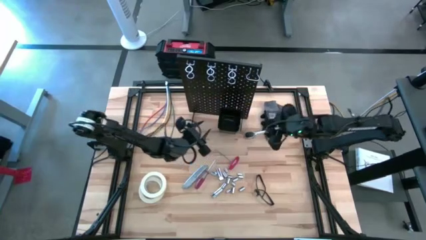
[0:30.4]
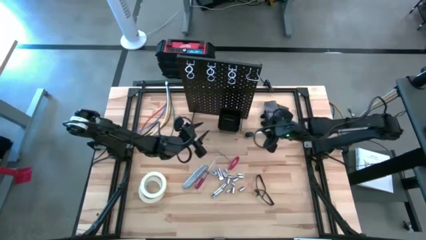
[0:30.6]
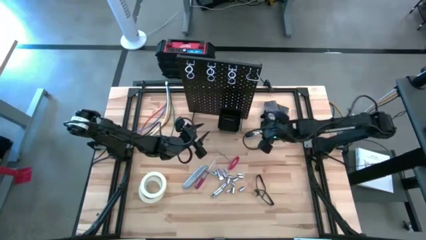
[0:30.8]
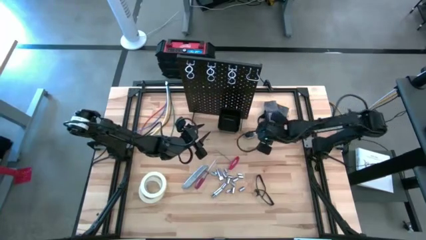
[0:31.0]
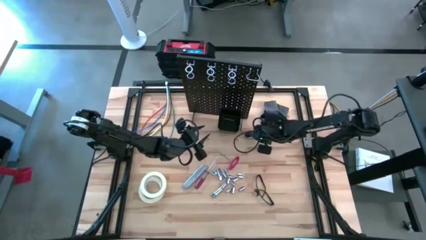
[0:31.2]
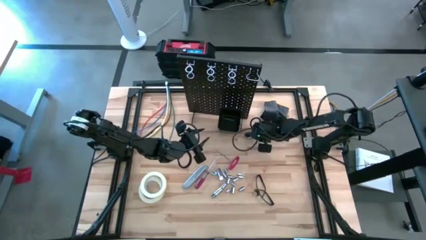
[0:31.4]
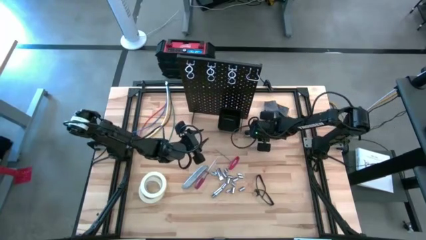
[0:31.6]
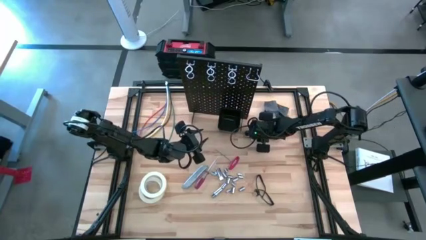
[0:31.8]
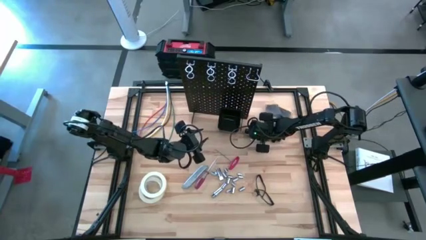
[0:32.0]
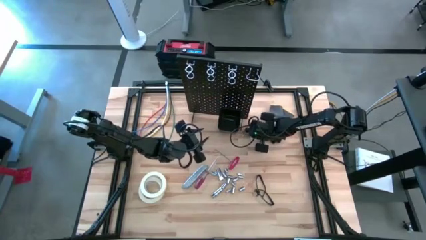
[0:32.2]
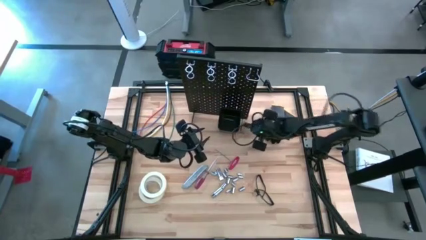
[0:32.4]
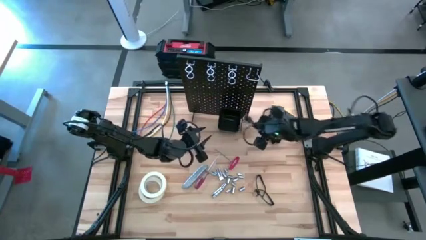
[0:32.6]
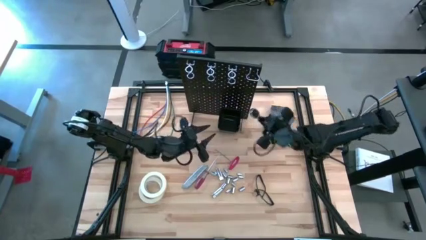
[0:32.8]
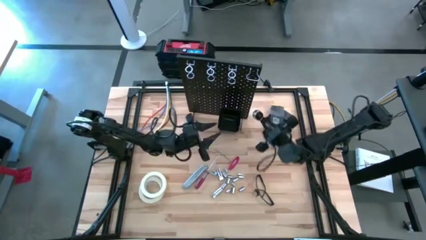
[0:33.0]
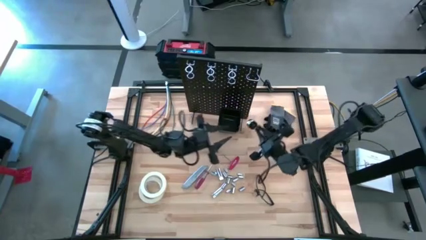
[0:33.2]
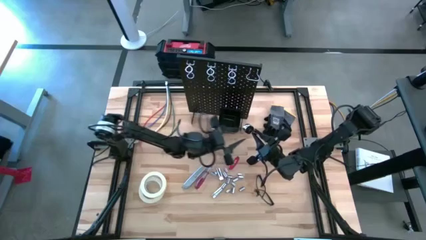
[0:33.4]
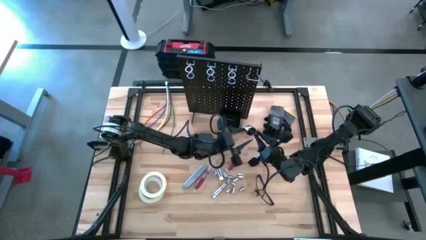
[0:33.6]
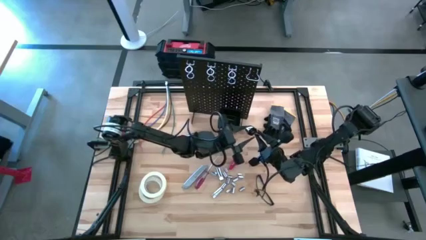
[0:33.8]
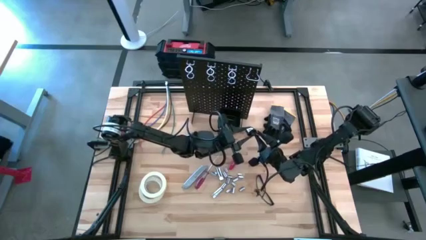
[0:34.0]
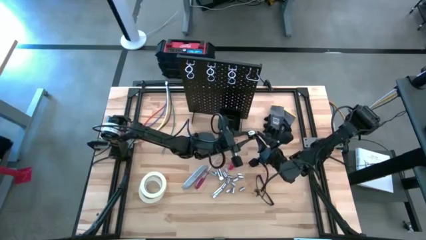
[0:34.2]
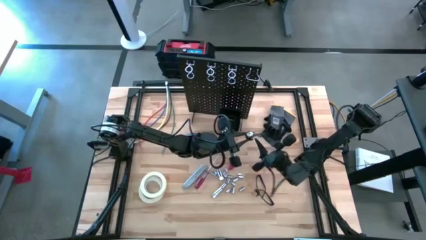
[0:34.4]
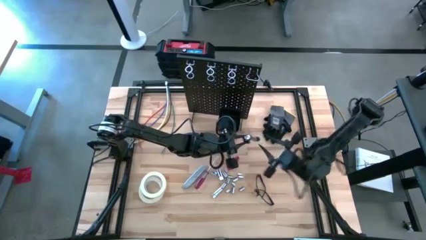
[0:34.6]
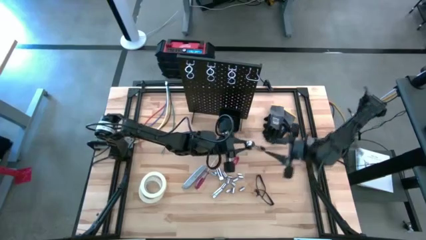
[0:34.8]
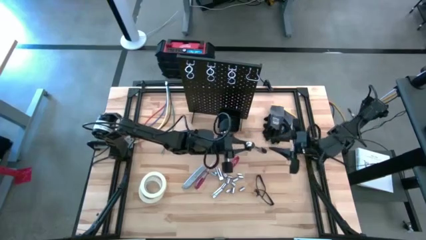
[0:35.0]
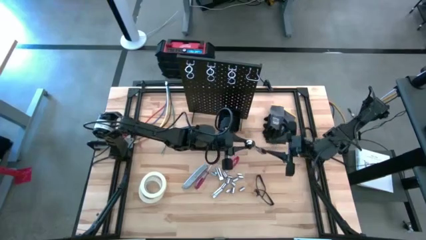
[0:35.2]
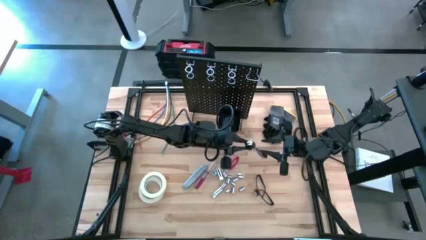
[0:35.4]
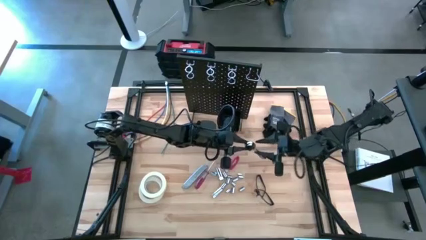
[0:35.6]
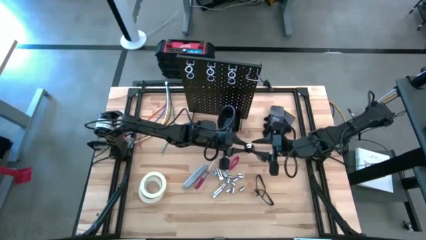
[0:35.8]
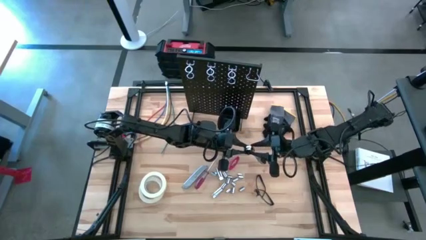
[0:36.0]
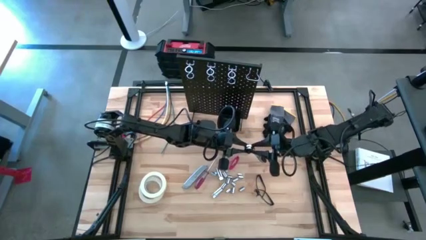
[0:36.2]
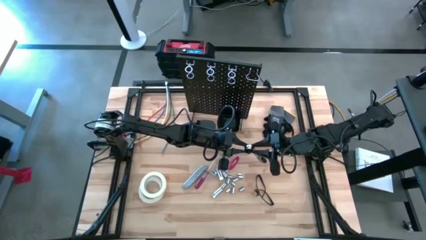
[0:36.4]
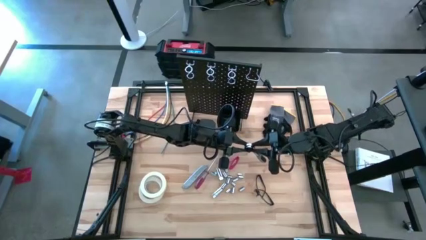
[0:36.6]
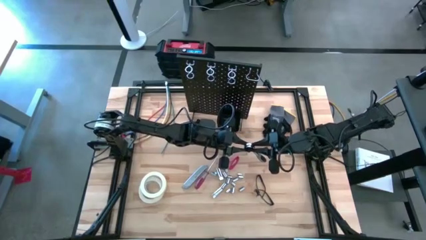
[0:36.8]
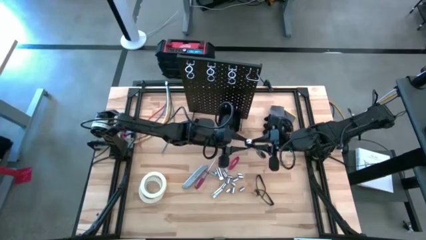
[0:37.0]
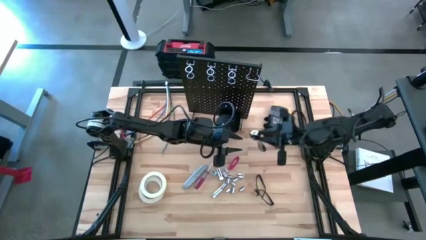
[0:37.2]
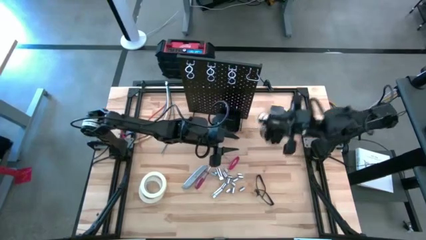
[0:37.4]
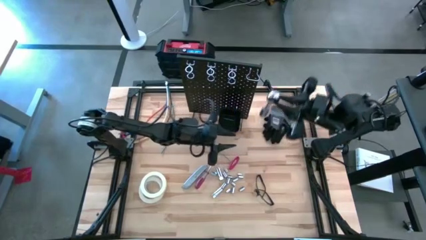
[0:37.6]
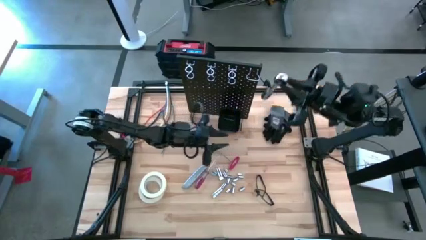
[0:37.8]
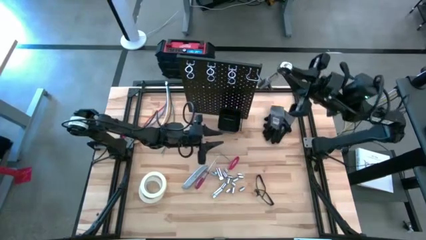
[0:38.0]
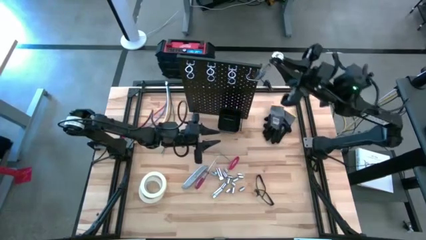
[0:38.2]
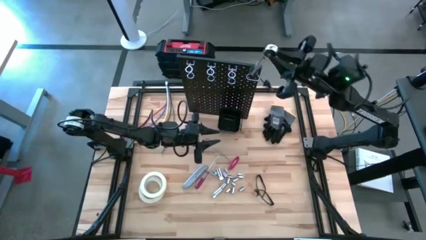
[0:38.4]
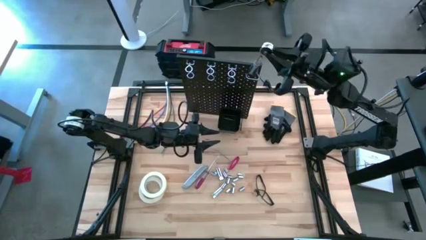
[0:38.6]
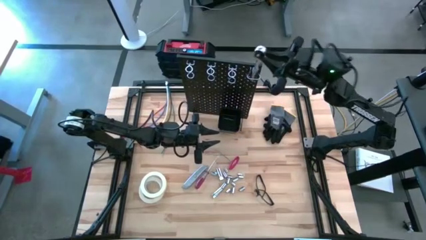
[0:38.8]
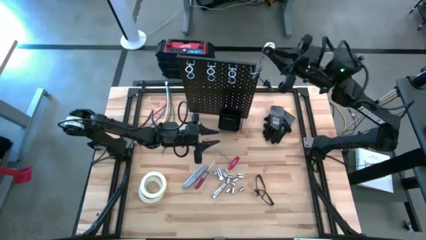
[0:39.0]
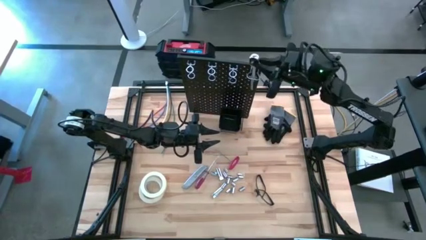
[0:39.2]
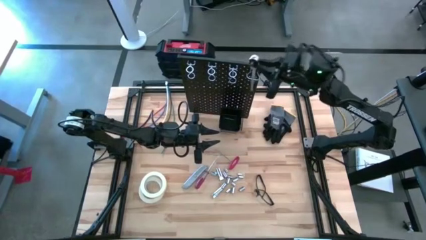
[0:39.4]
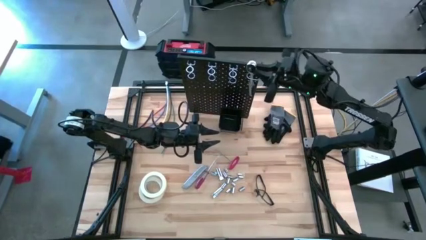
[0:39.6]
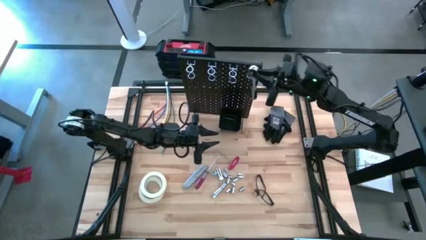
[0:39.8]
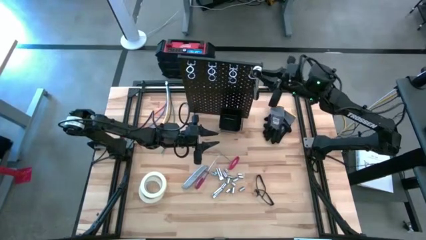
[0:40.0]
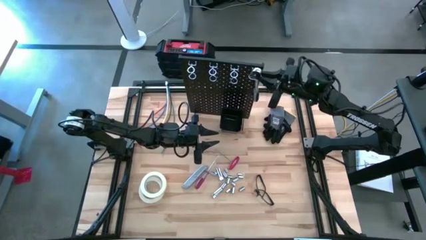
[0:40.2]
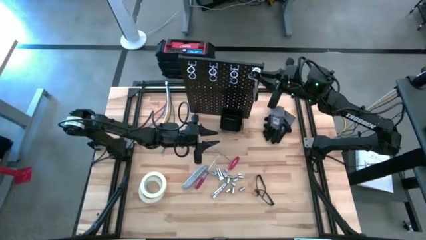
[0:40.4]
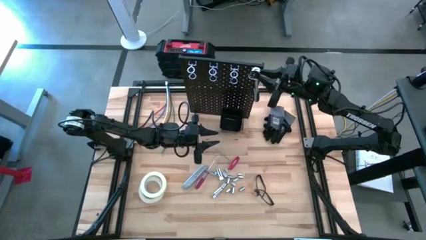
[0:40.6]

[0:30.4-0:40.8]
Task: Hang tools onto peg board
Hang the ratchet wrench on the peg board

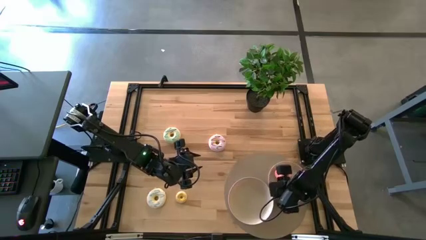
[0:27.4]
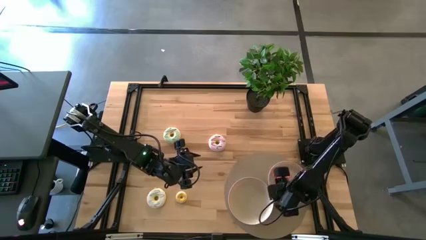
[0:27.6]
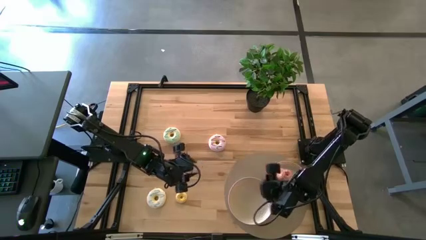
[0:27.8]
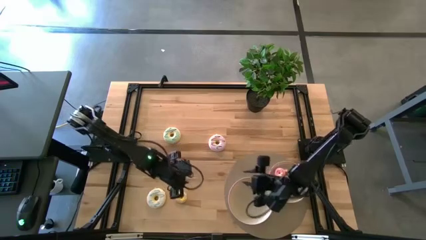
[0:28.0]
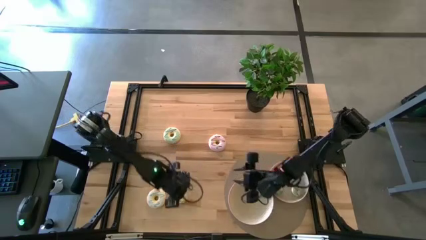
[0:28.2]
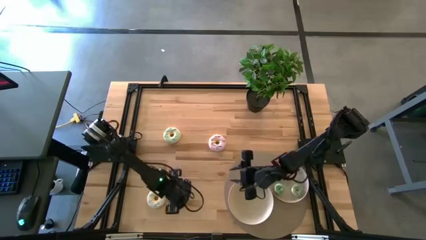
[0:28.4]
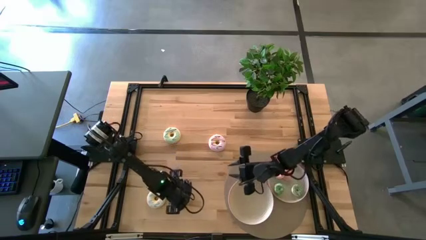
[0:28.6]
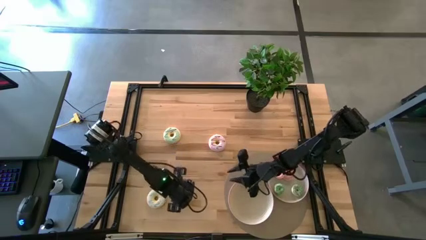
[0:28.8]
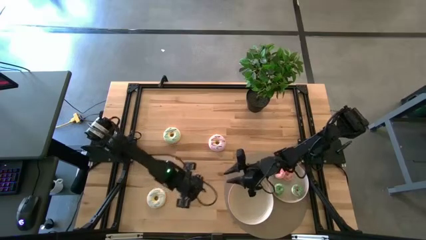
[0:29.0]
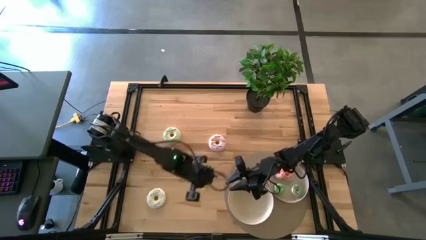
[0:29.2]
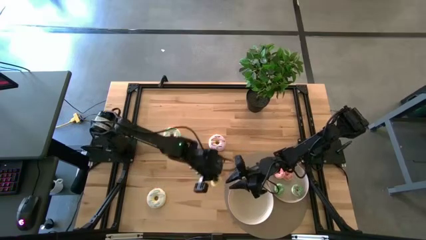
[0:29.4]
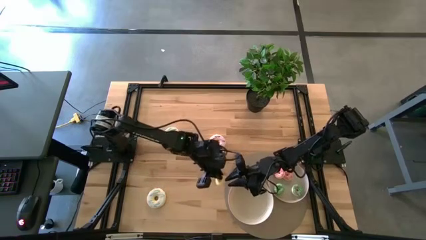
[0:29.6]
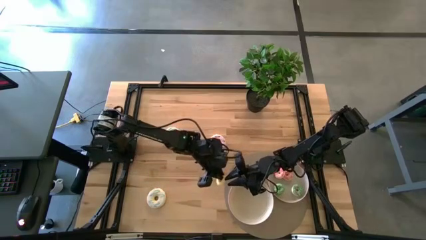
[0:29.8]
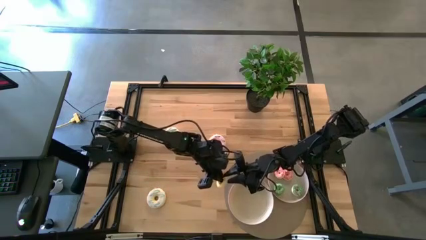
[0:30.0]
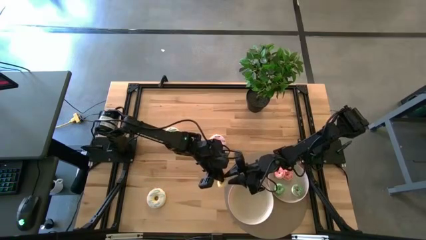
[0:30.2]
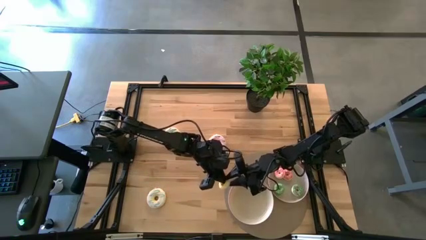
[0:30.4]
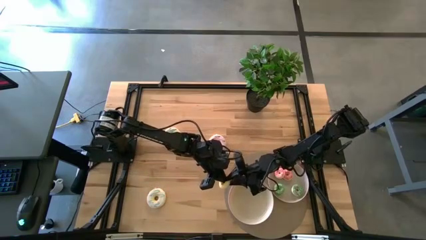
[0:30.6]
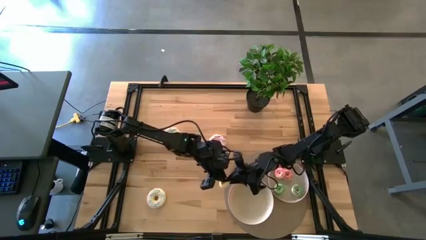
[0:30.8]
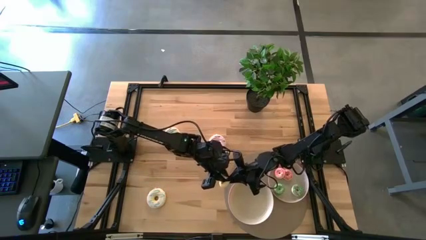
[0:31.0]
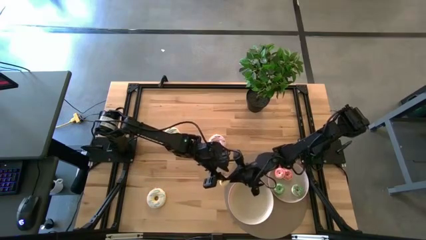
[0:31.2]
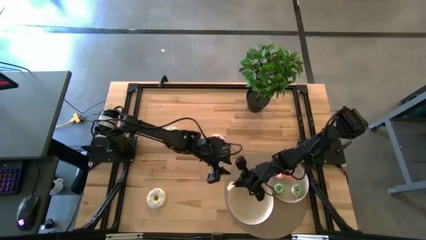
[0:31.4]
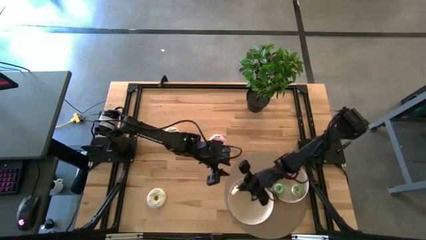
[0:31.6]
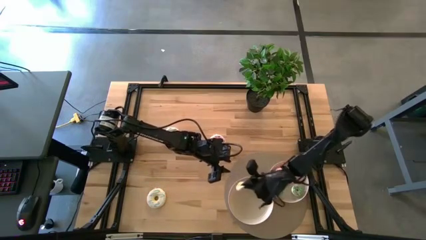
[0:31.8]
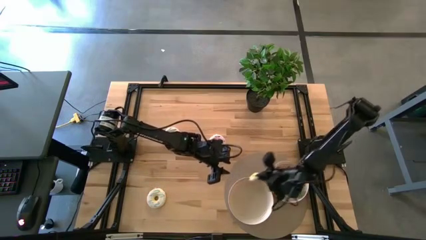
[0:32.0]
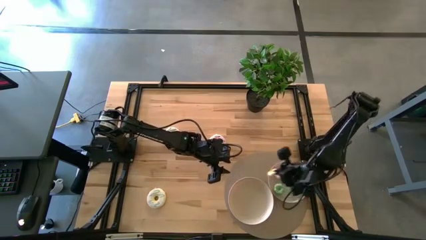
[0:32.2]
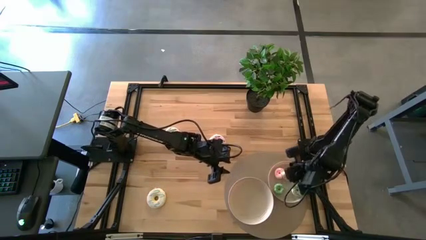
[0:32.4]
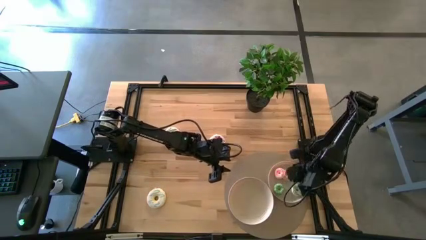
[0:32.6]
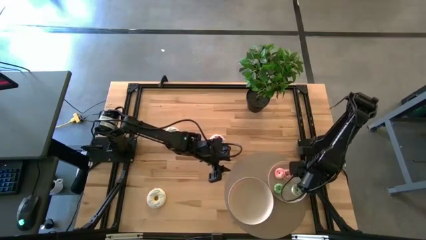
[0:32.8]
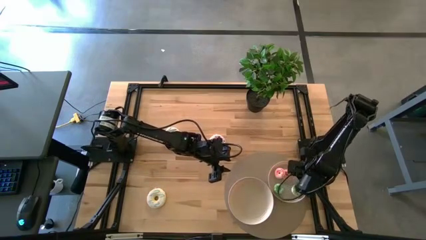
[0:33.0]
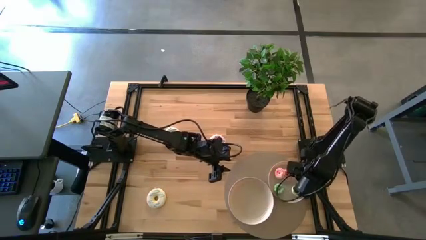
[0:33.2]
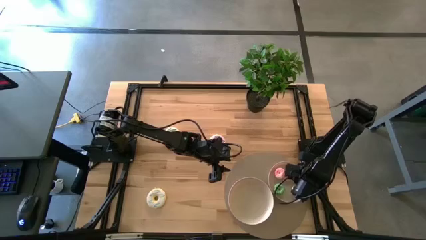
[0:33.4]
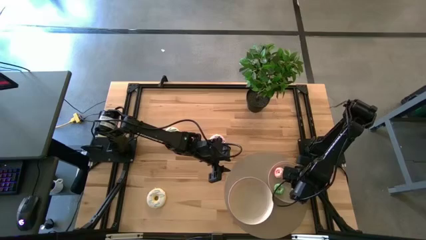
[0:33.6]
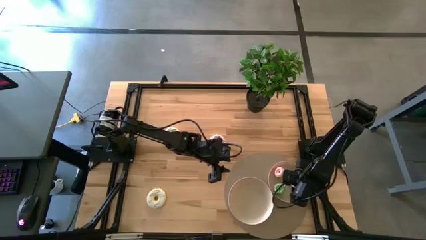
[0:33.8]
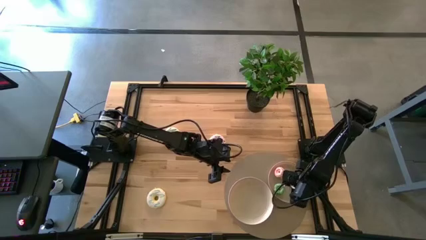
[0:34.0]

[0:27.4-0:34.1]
Task: Pick & Place donuts
Put the small yellow donut into the right white plate
